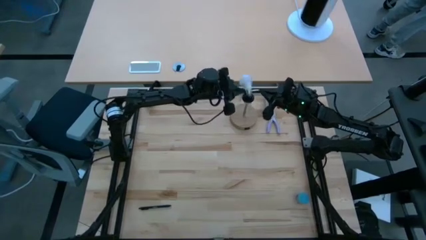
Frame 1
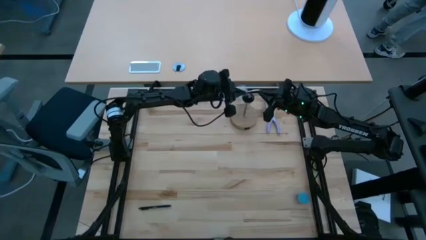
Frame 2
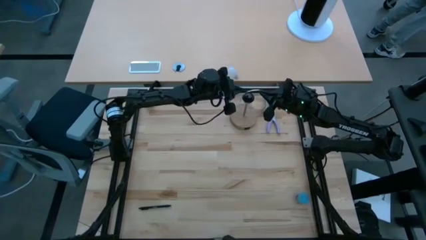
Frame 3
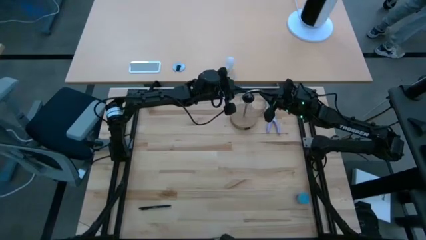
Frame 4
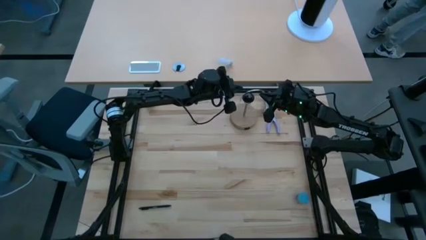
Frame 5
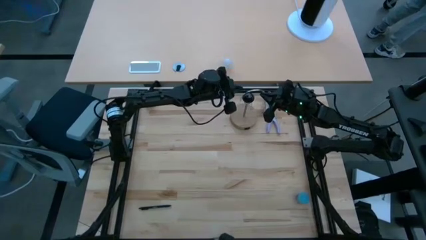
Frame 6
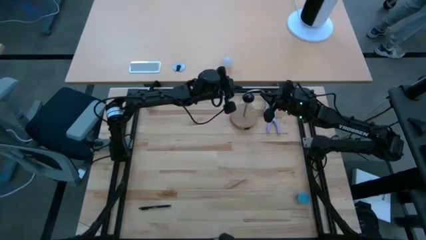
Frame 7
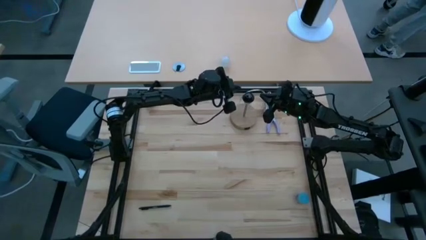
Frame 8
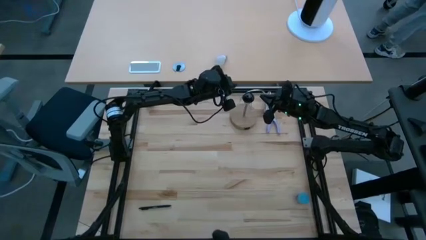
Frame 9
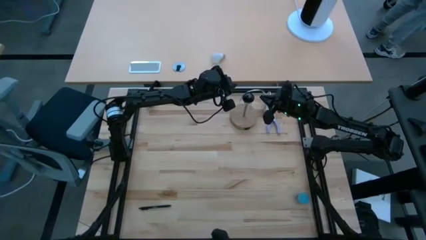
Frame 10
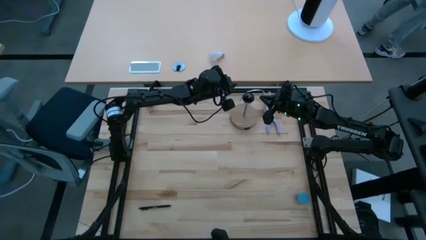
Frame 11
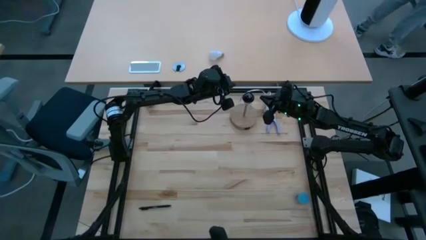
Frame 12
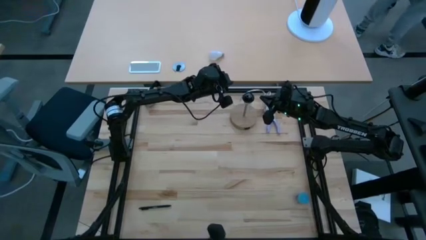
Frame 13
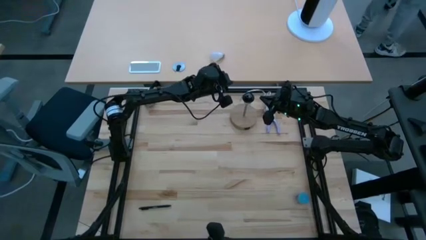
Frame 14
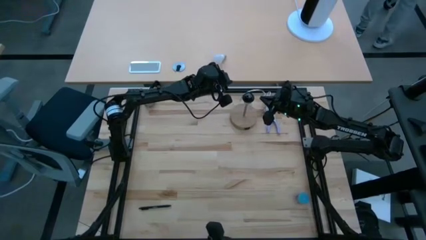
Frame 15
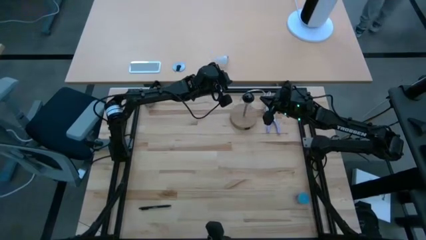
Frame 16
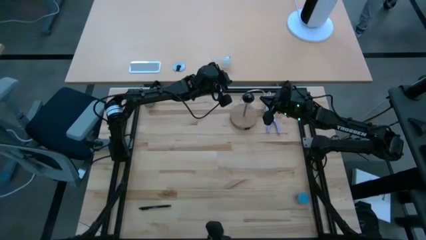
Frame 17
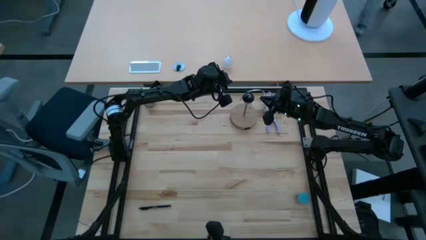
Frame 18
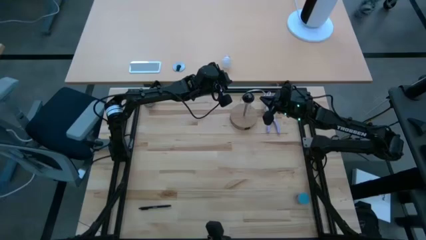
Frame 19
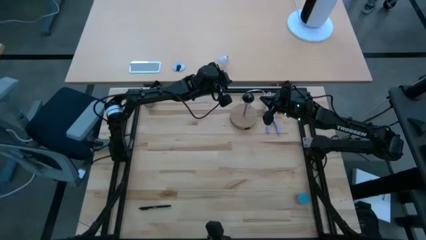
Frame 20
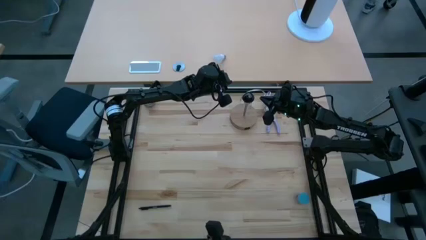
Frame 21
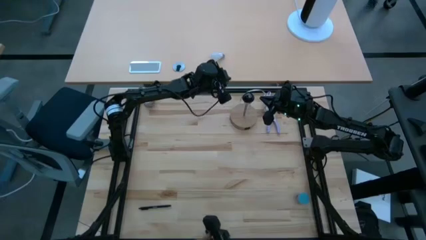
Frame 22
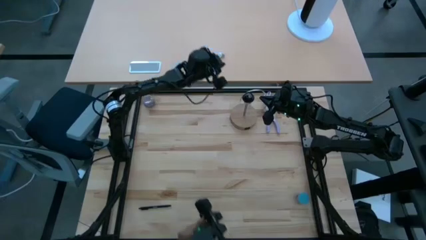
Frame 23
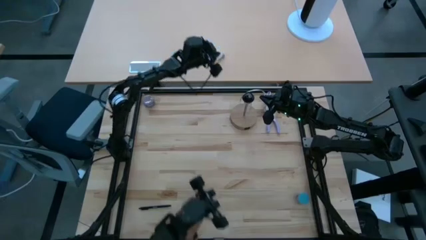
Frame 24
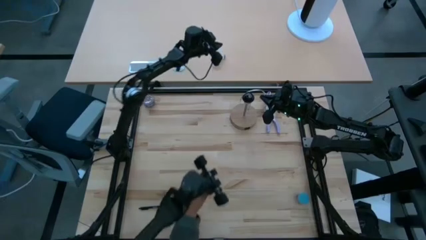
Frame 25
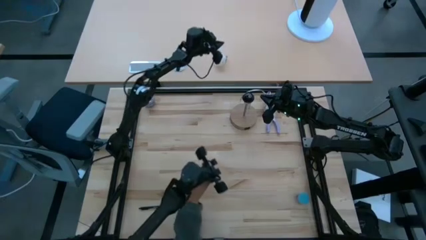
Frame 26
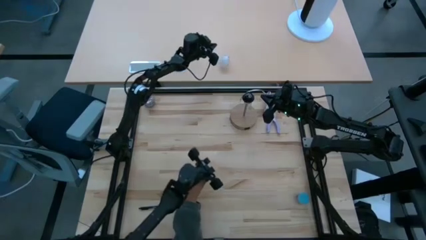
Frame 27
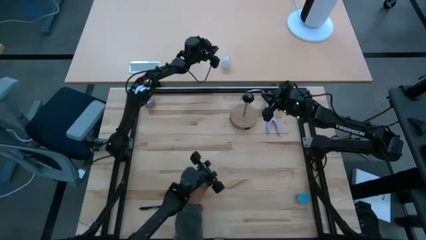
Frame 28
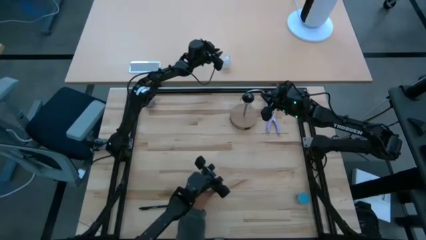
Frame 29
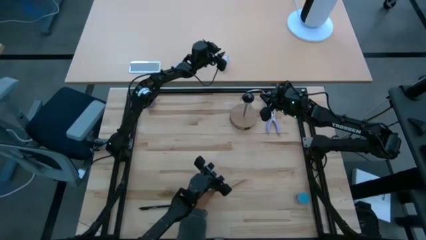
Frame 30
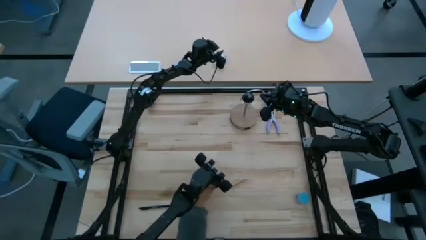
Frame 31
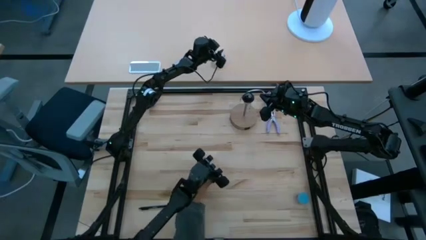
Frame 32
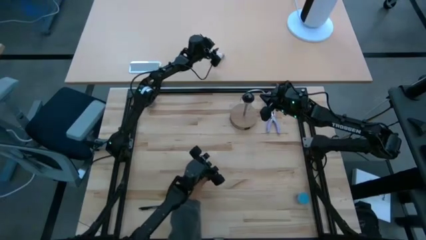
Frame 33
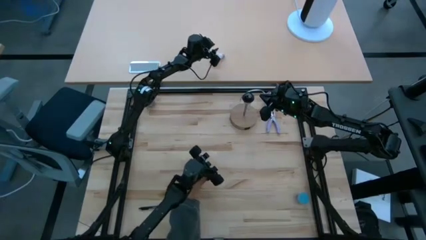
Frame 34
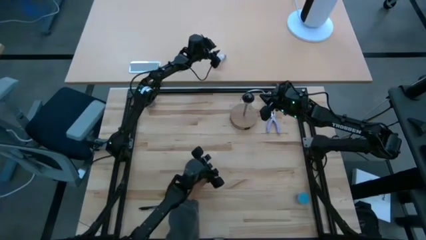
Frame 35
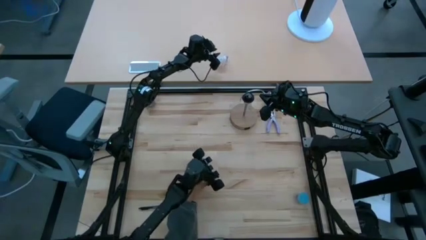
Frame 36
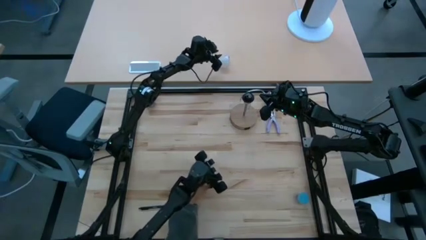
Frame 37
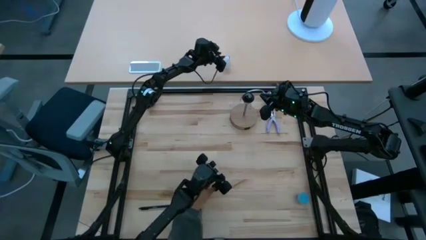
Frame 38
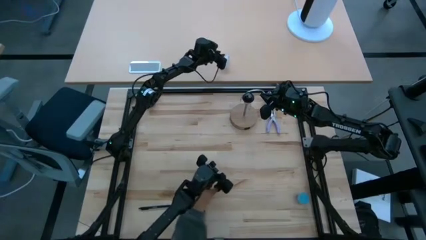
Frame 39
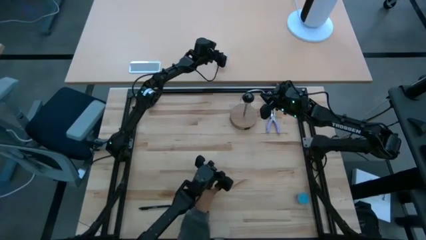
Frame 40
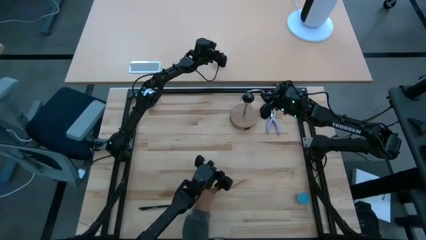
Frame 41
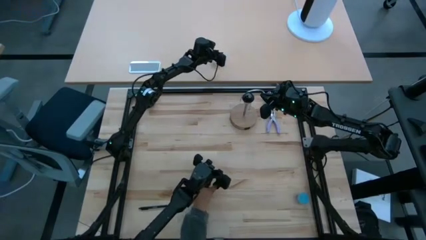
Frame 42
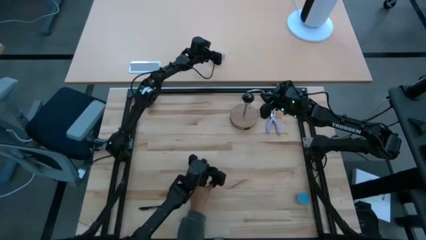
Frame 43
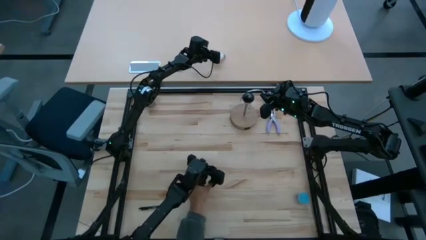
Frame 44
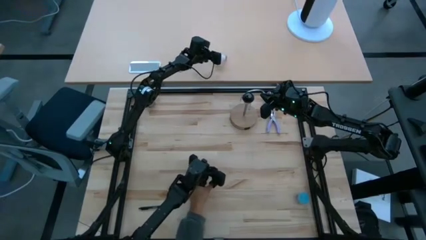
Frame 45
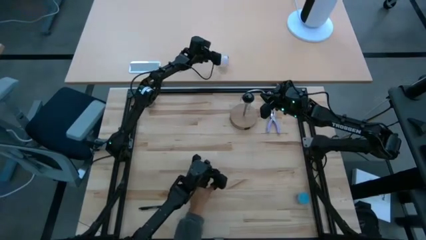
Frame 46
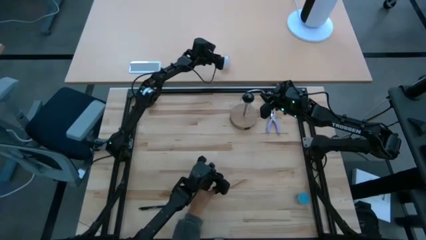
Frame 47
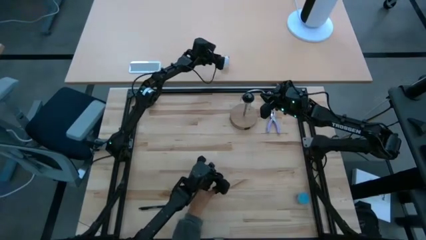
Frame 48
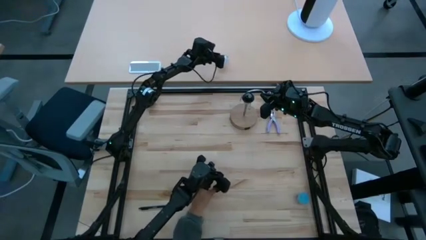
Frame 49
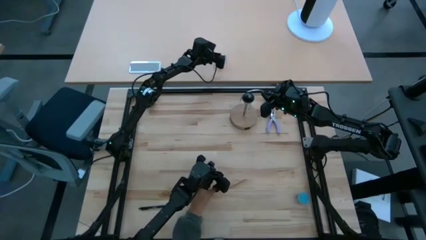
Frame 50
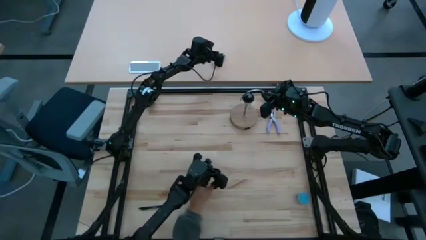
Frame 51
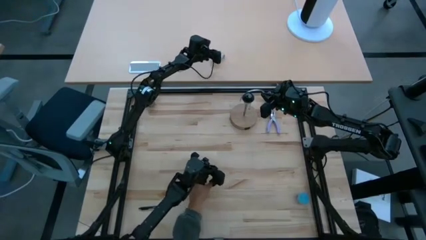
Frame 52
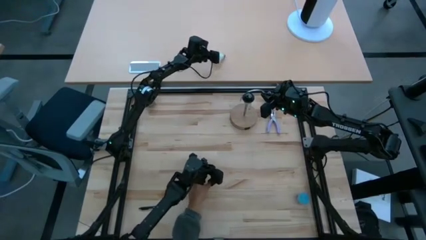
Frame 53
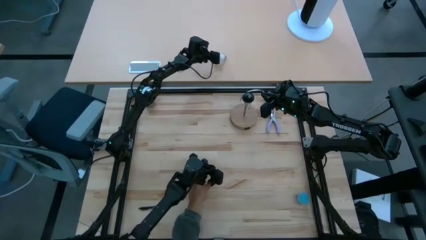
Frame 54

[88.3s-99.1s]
Task: Screw lightbulb
Move the lightbulb to the table

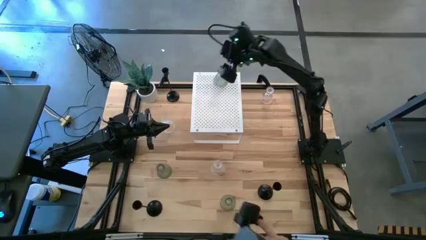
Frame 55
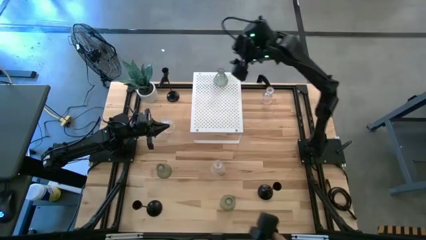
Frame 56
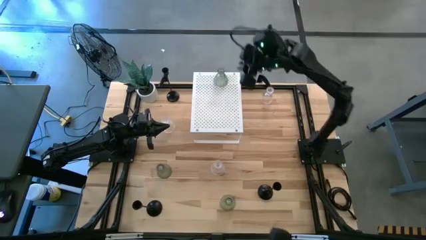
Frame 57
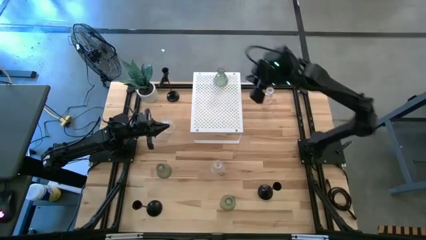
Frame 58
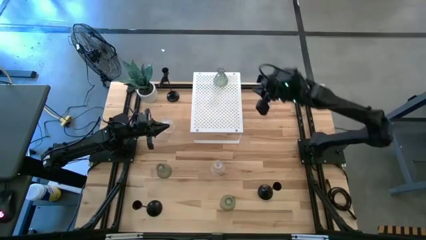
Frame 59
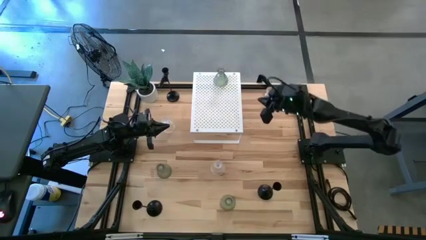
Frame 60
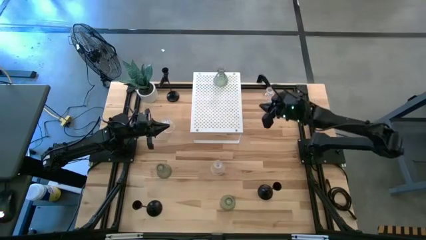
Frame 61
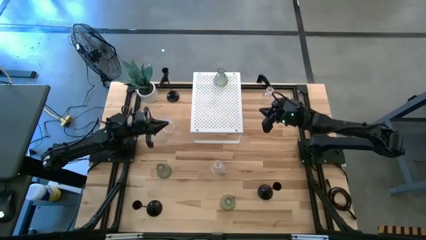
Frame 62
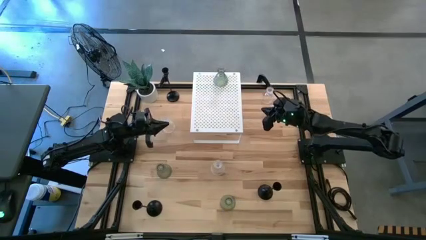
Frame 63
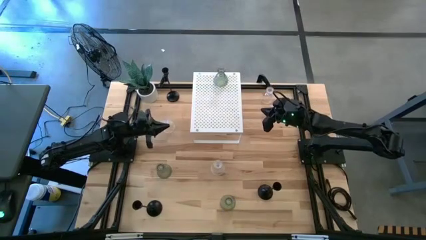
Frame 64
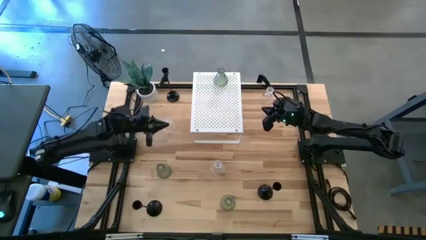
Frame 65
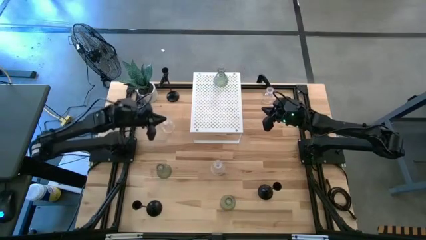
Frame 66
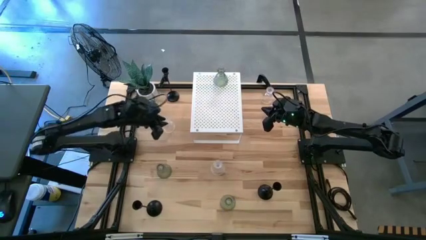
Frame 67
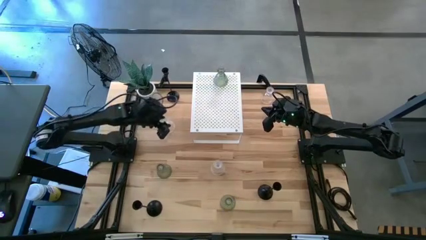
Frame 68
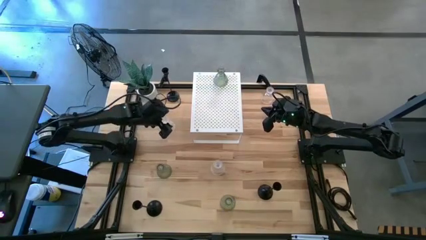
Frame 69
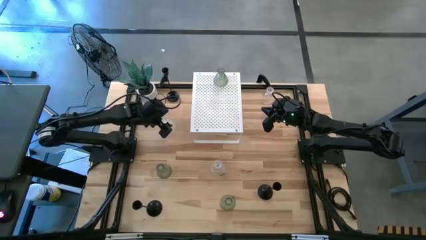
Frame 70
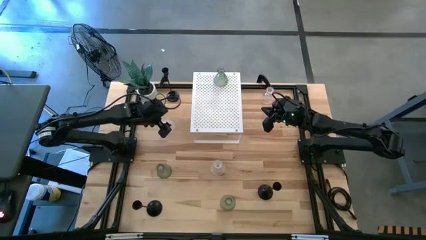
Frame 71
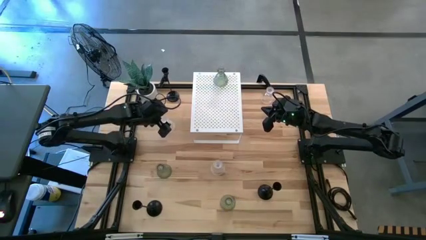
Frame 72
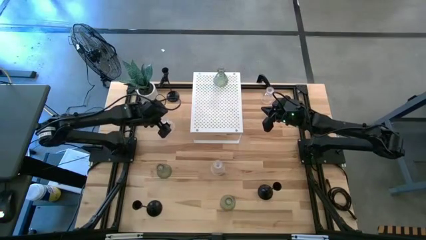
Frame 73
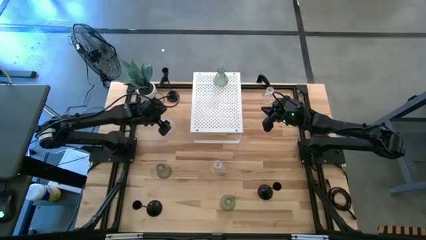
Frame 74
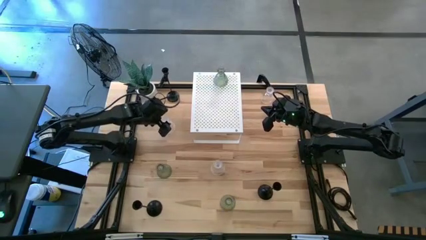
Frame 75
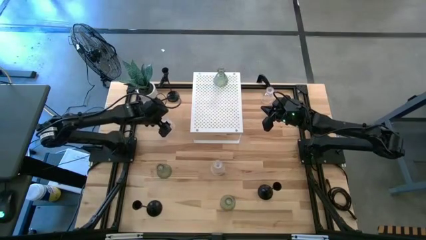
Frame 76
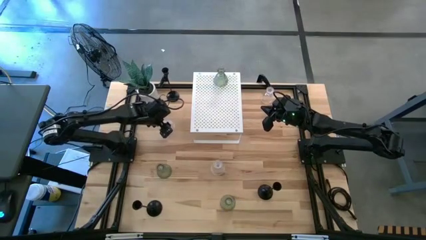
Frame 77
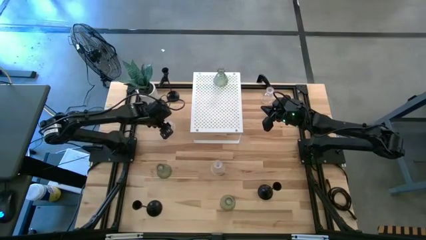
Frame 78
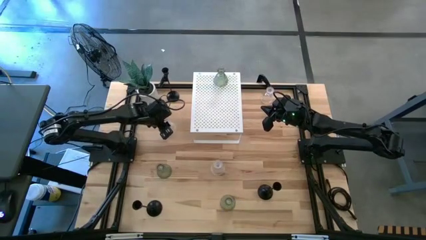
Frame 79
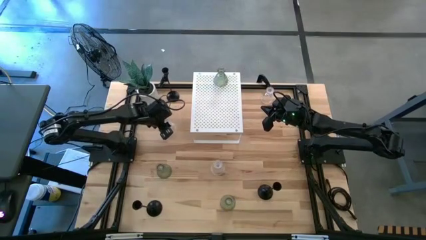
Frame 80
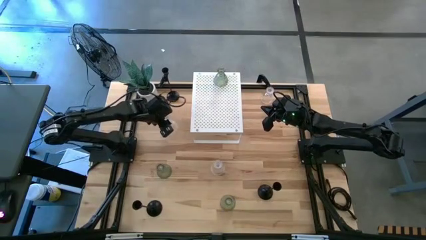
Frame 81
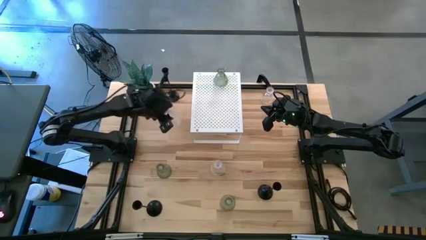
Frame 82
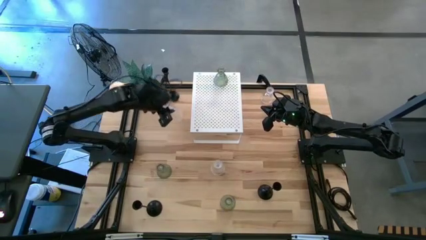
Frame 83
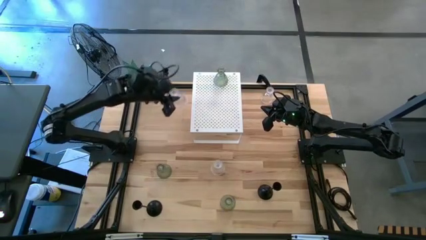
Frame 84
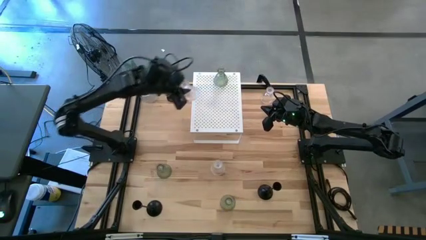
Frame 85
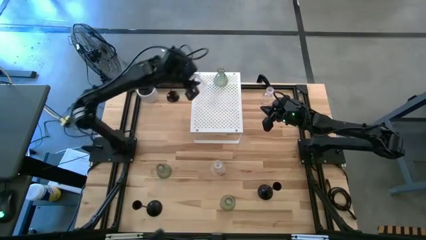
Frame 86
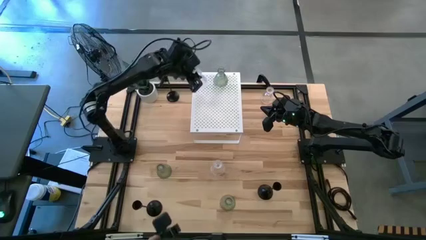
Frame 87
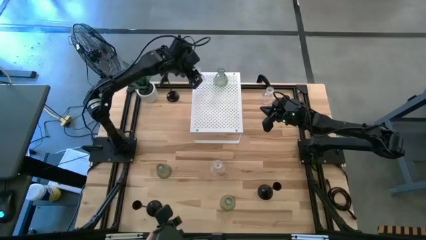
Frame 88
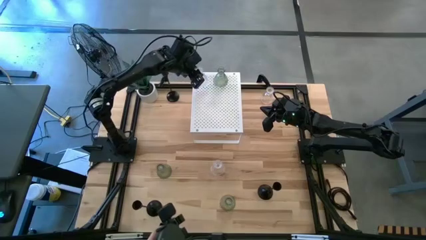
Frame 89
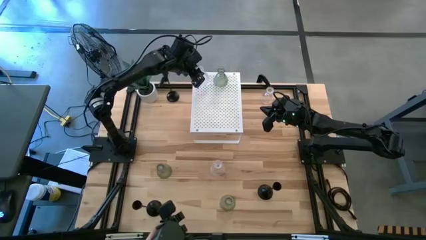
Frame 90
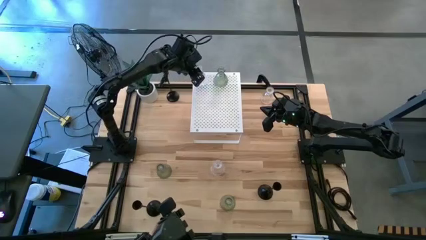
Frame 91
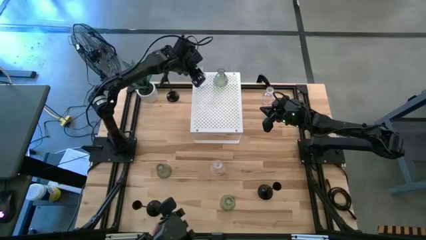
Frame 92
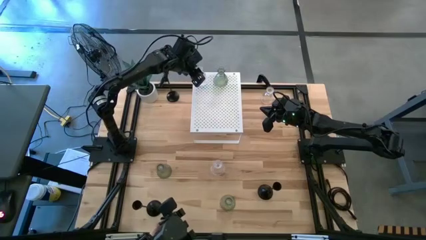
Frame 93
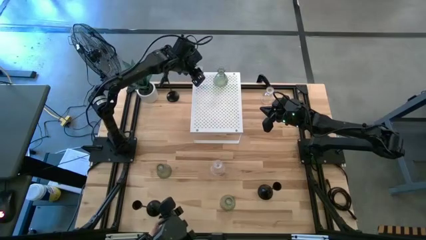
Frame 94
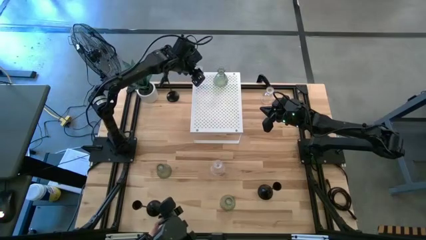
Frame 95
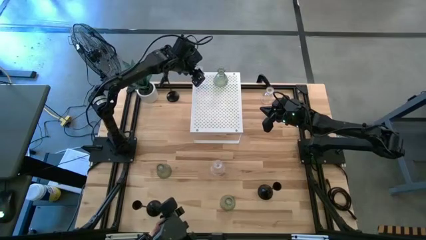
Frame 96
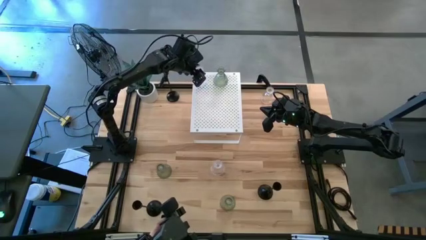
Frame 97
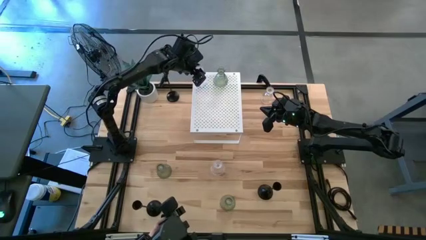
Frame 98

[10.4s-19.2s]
Task: Pick & Place candle stick holders
Put the top left transparent candle holder on the shelf
